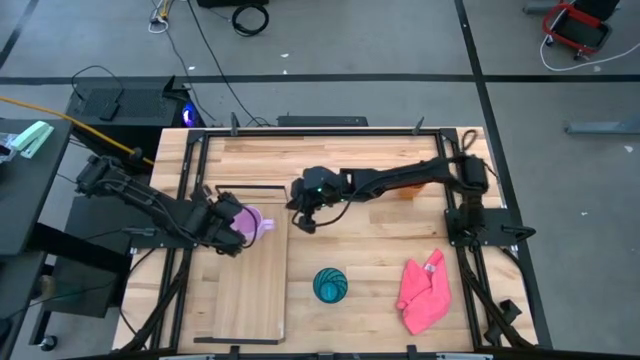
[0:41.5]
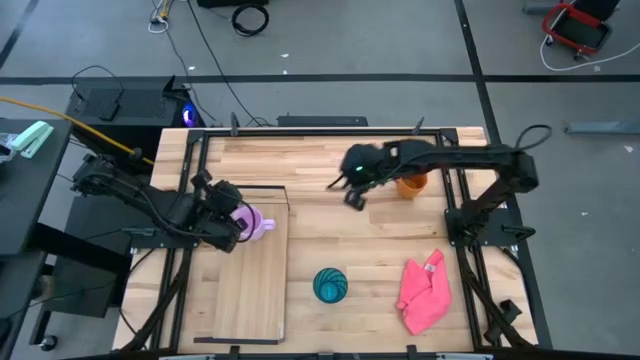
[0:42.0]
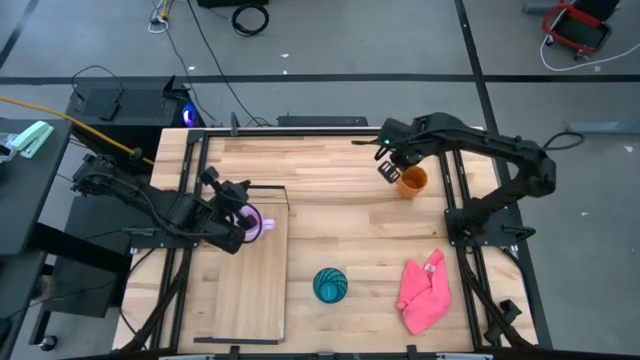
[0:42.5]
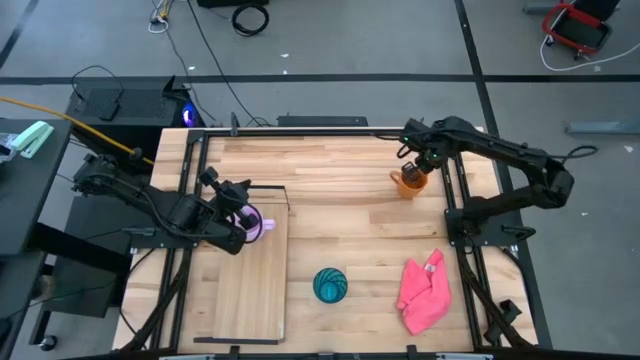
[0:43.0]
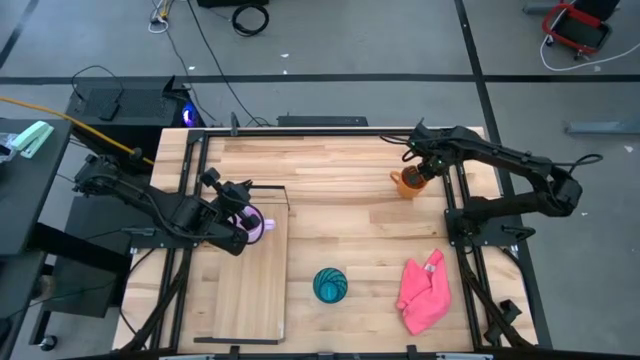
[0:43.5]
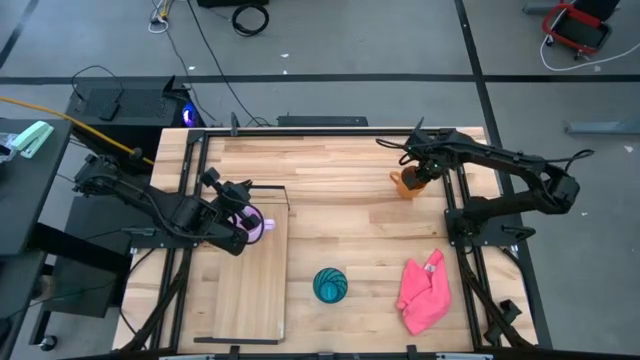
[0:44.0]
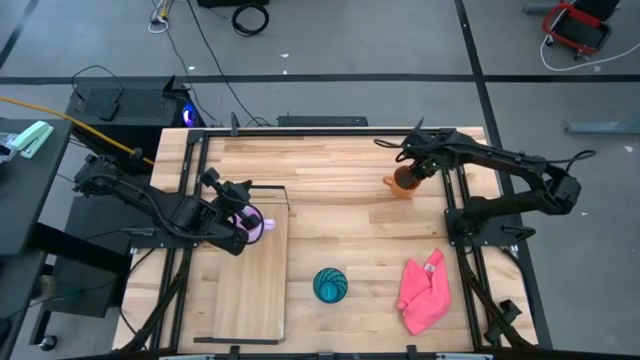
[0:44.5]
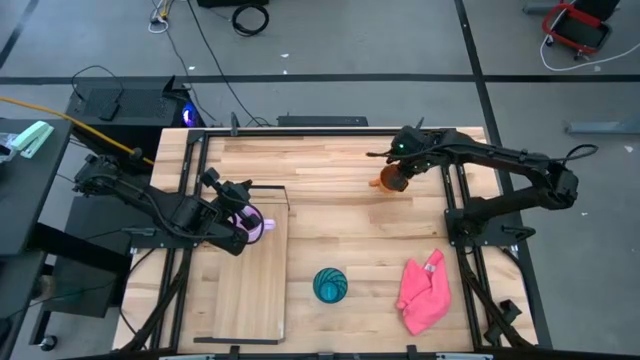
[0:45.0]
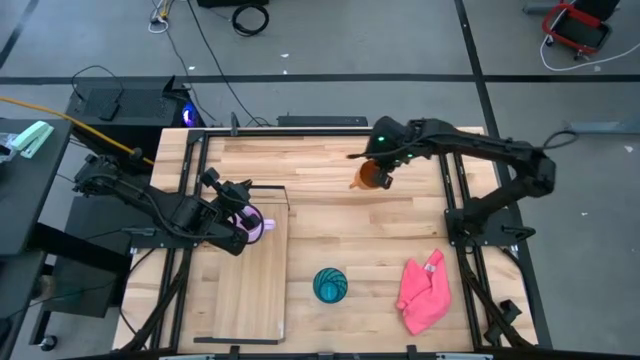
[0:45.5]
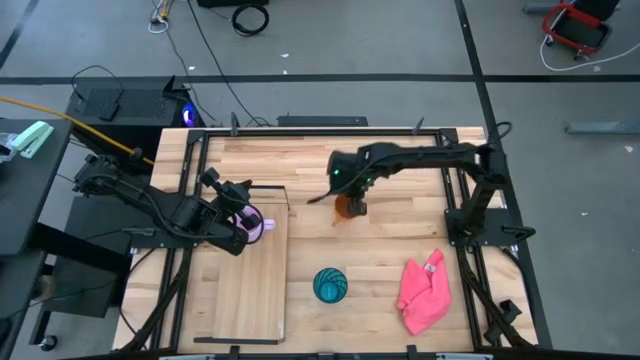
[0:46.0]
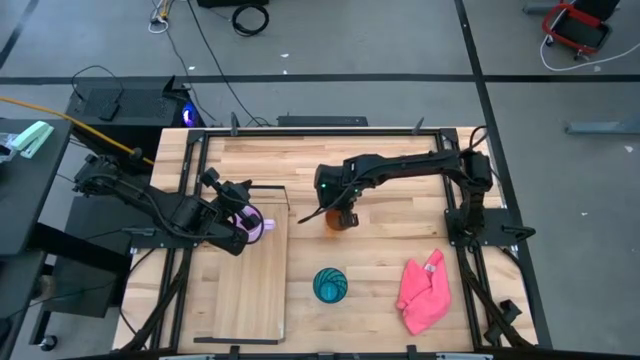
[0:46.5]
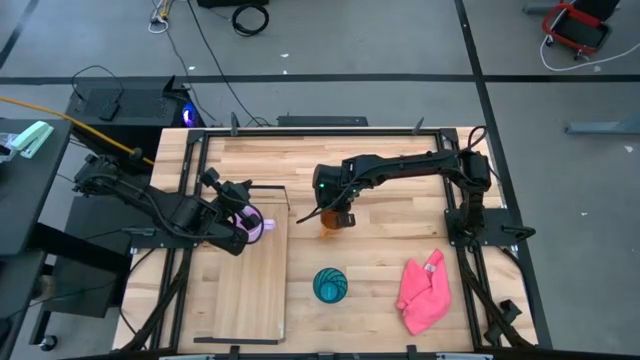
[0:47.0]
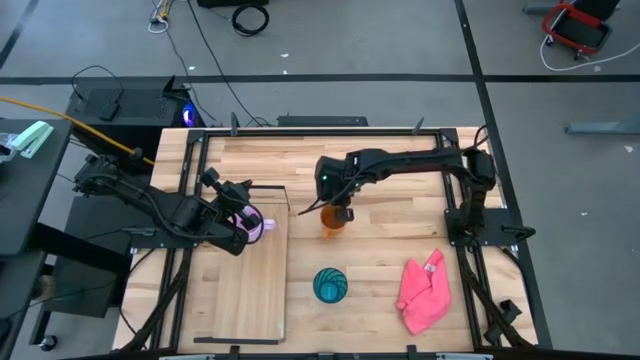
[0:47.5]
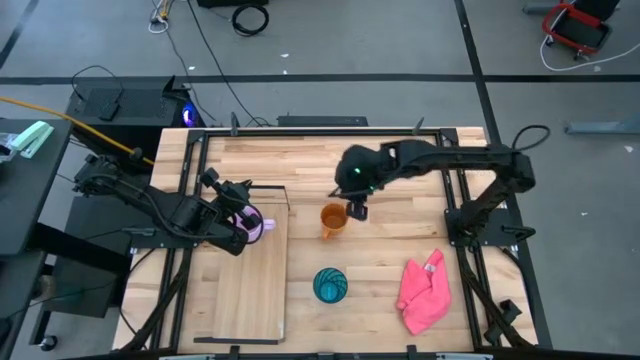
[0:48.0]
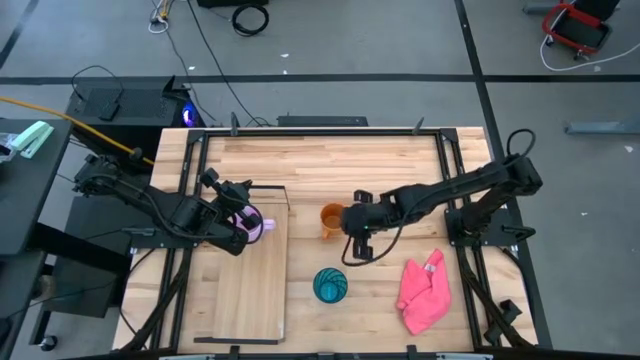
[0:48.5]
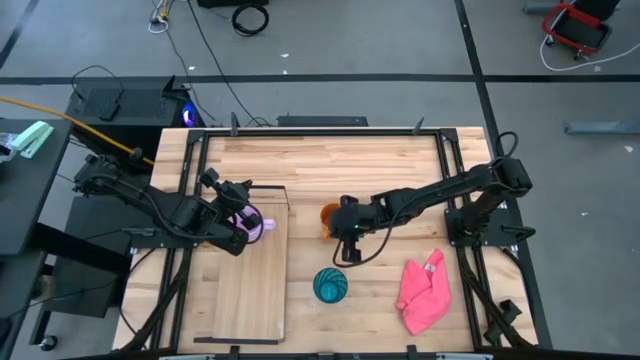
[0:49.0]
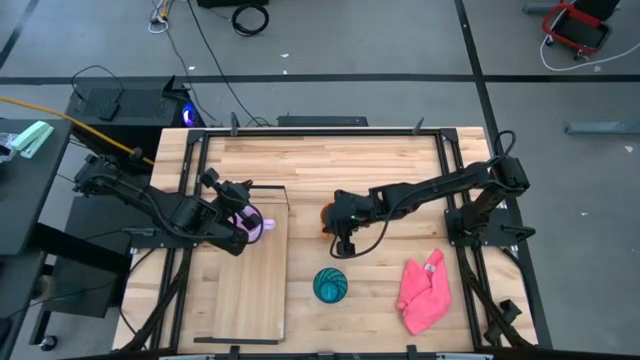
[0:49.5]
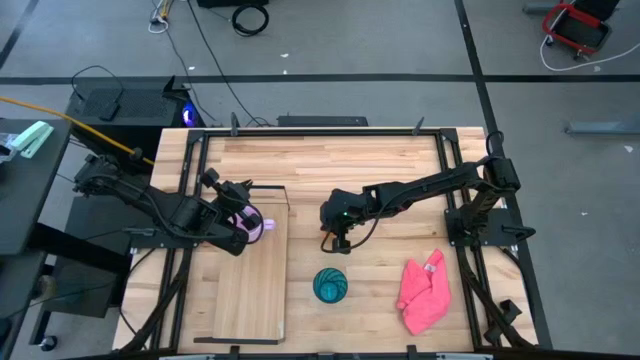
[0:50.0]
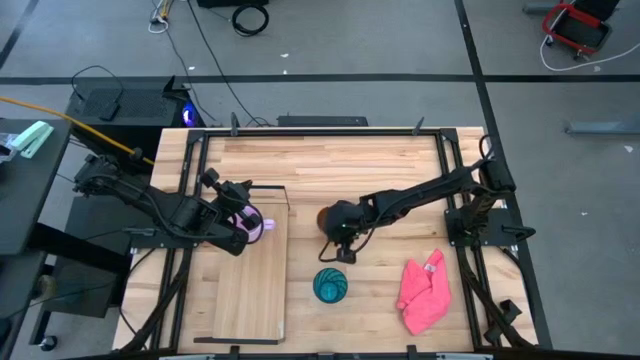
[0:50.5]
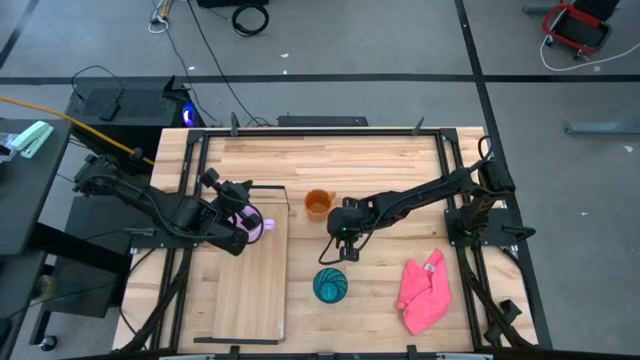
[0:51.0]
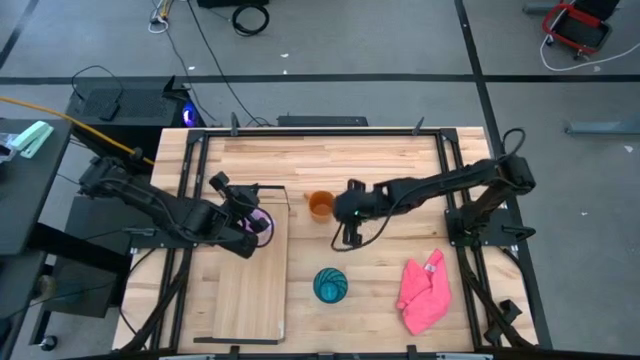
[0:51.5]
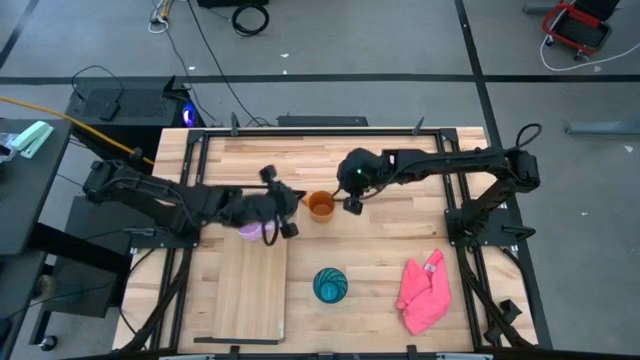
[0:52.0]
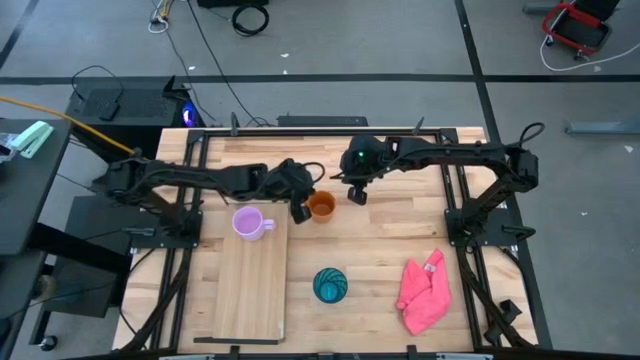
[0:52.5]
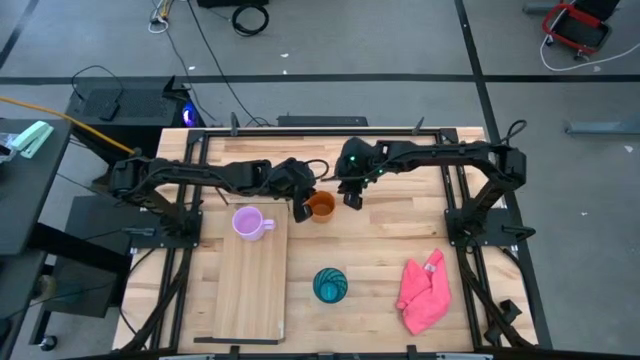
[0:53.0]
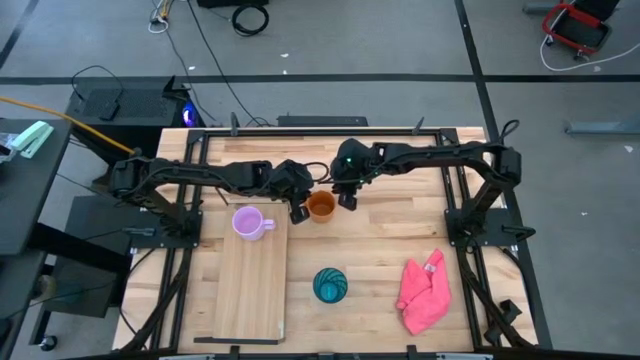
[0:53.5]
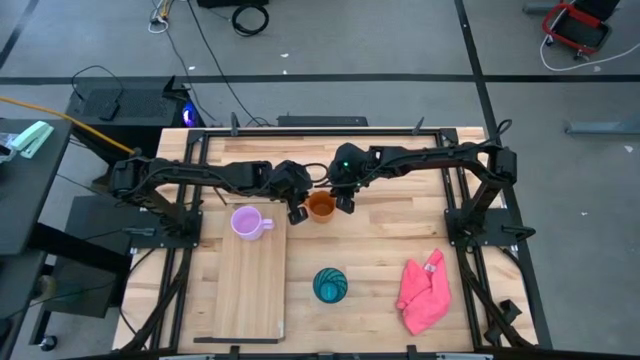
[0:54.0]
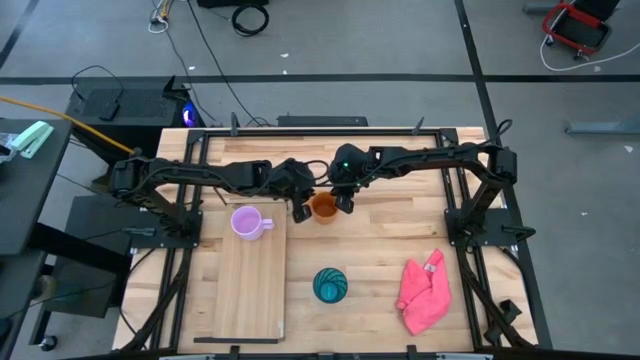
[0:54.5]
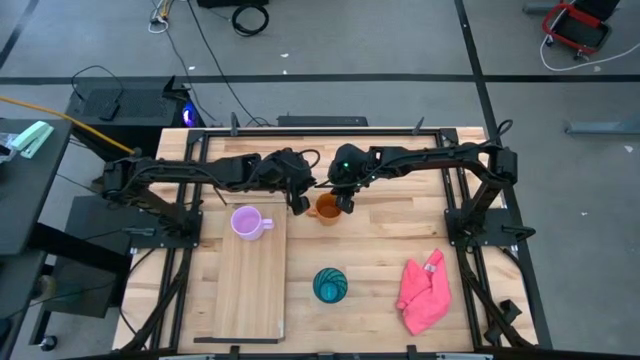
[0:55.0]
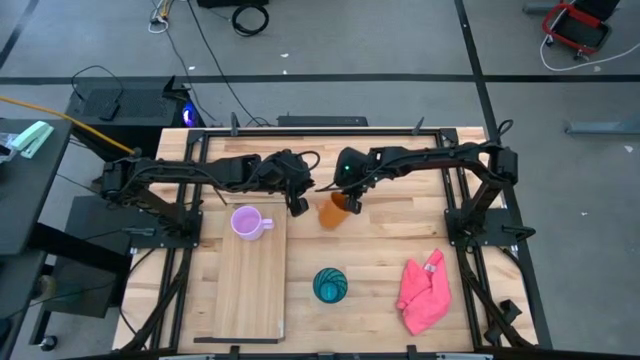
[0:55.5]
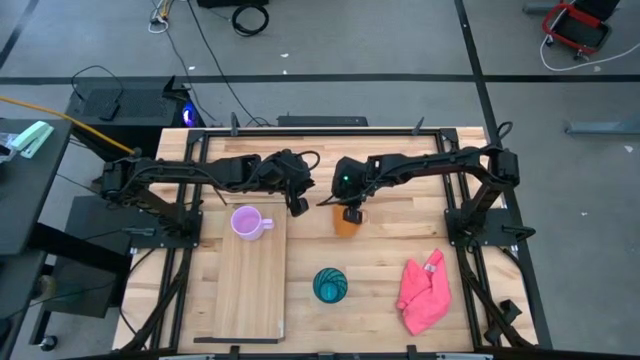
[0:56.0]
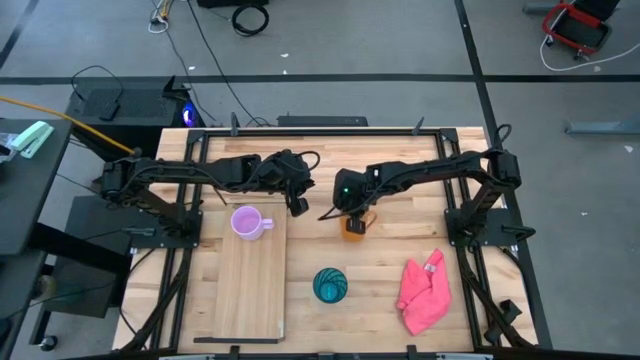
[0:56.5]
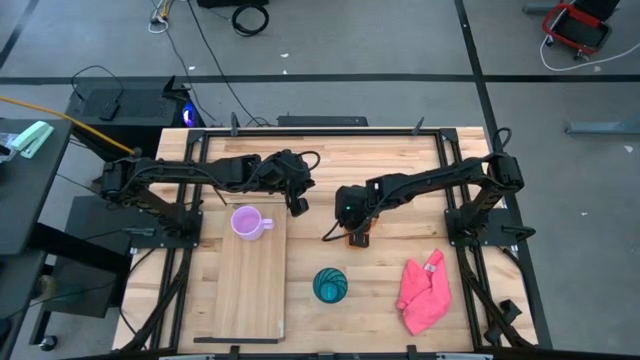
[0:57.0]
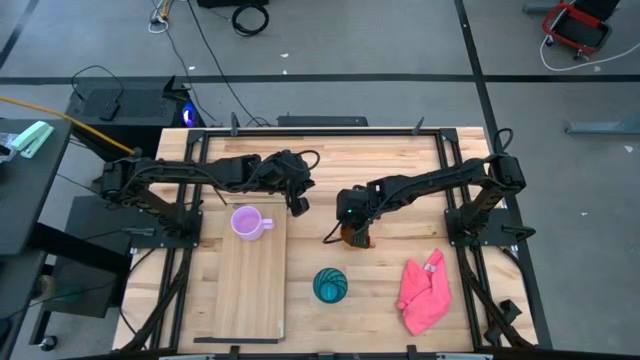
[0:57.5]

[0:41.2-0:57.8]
Task: Stack small to large cups/mugs on shelf
Put the orange mug on the shelf

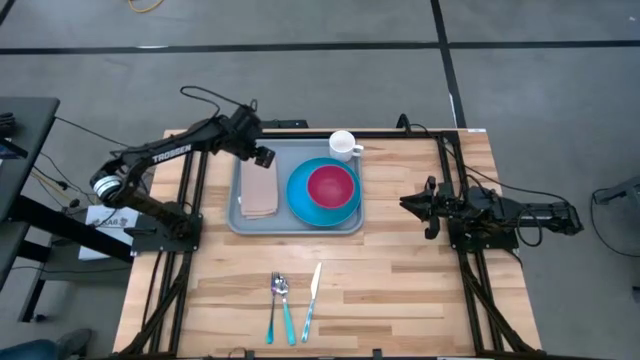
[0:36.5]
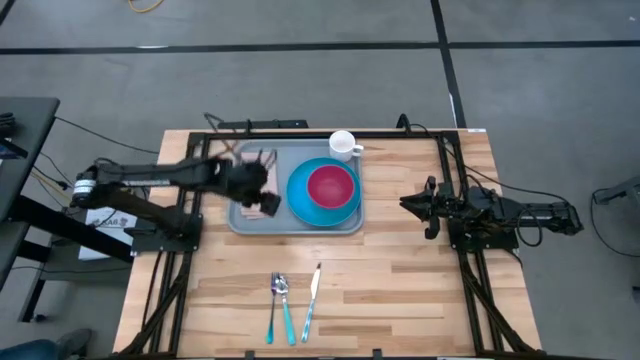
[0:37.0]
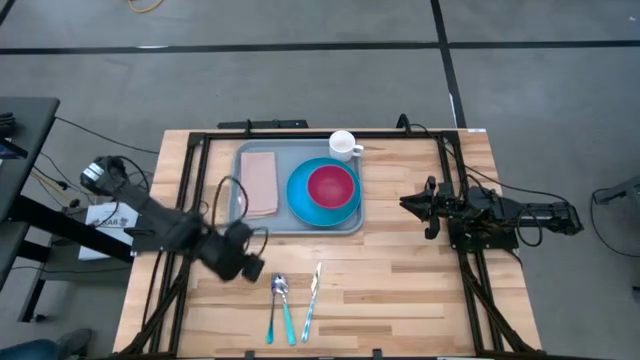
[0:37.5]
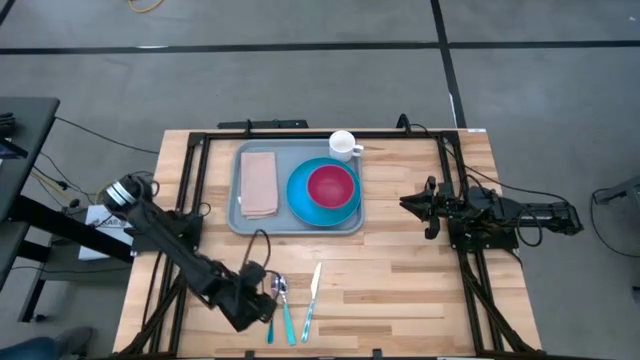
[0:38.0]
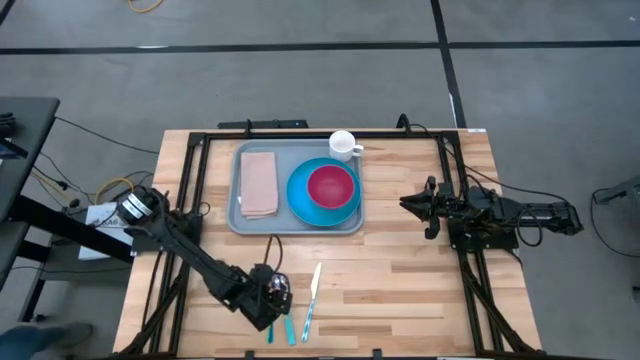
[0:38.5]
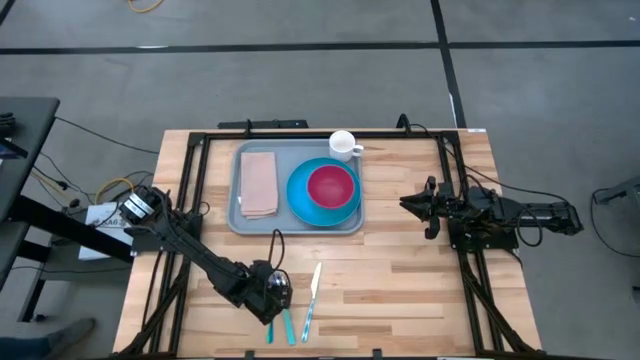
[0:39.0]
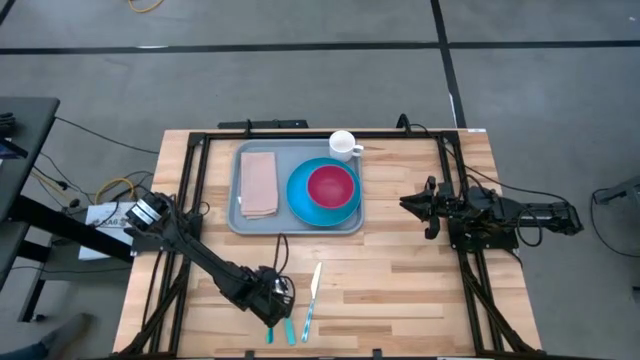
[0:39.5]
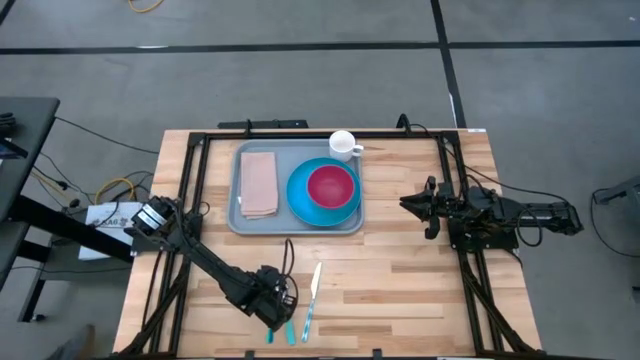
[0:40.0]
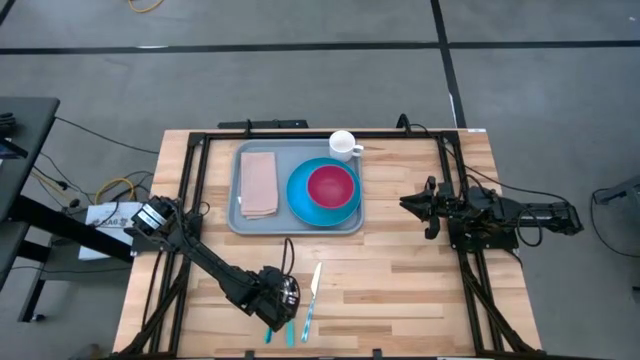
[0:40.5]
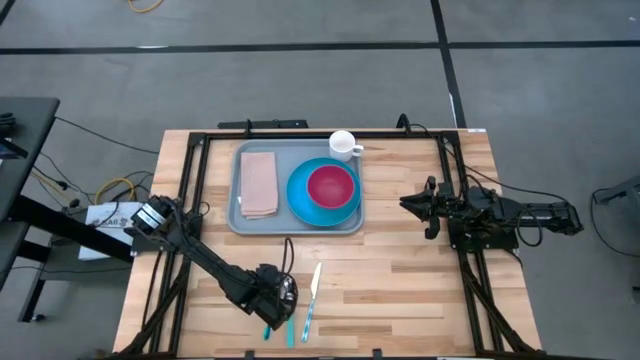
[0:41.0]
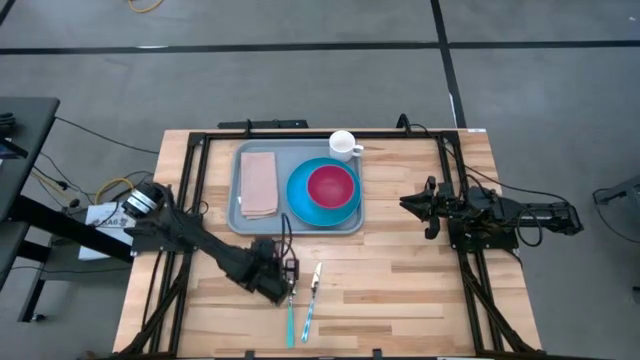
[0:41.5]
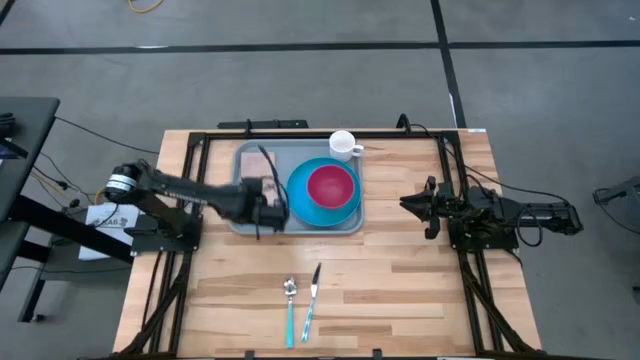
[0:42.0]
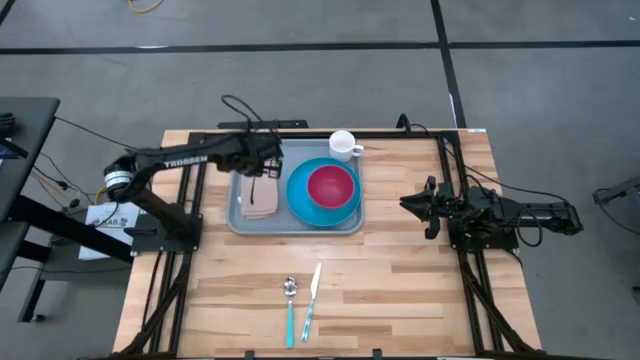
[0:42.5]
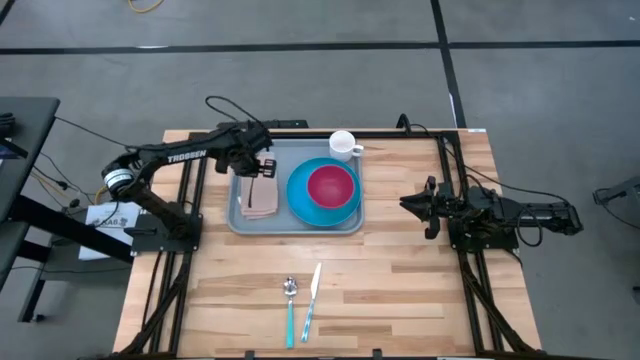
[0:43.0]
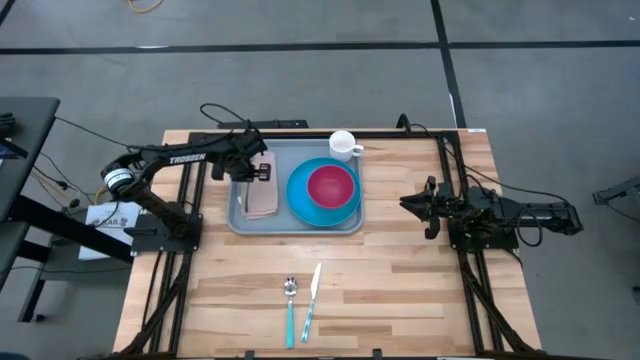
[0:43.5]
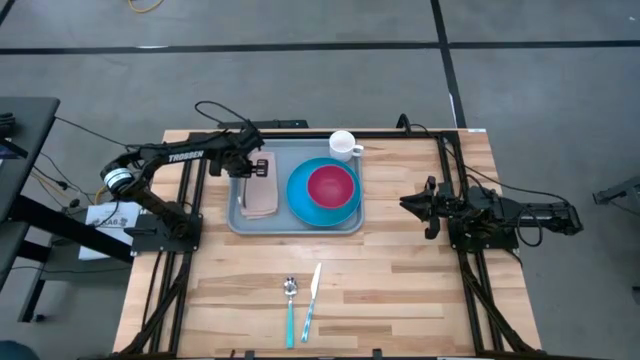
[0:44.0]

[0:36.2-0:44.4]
Task: Set up tray
Put the blue fork on the brown napkin
